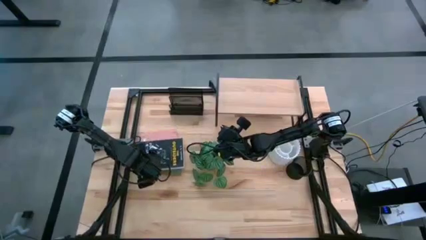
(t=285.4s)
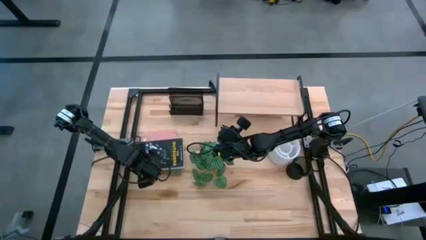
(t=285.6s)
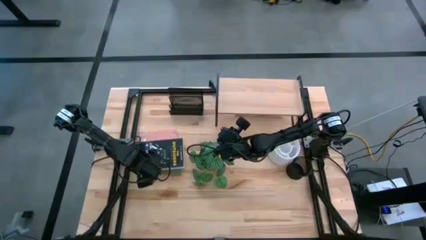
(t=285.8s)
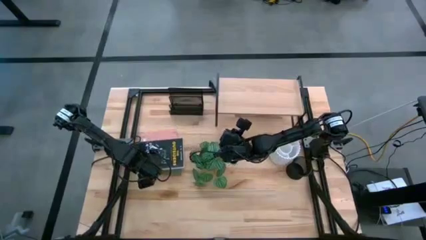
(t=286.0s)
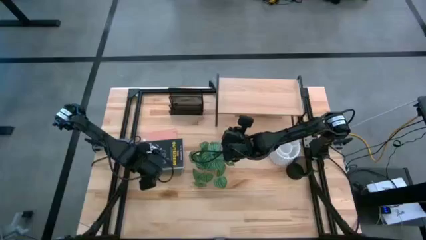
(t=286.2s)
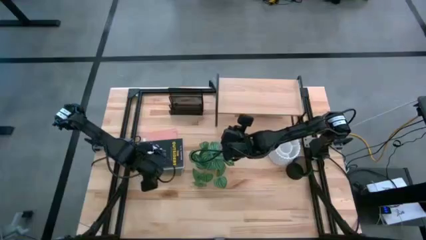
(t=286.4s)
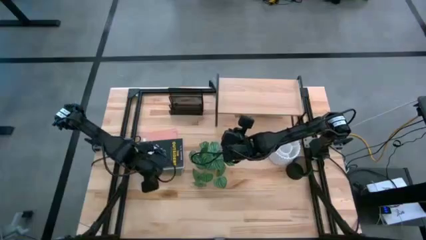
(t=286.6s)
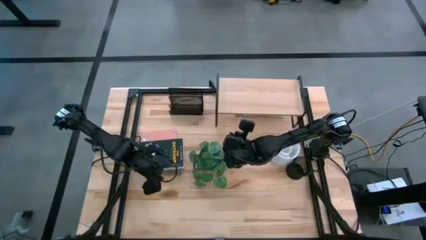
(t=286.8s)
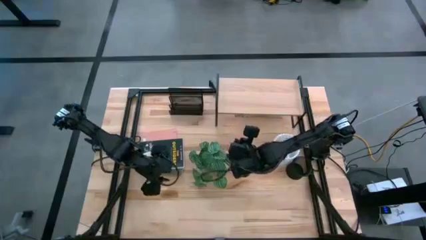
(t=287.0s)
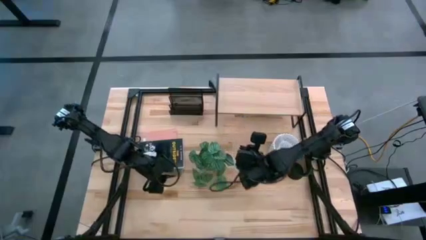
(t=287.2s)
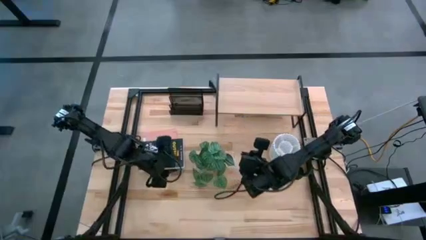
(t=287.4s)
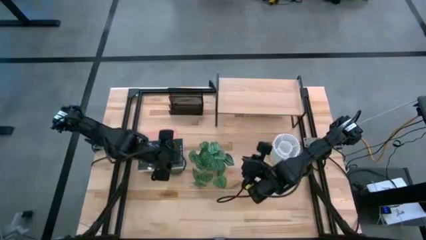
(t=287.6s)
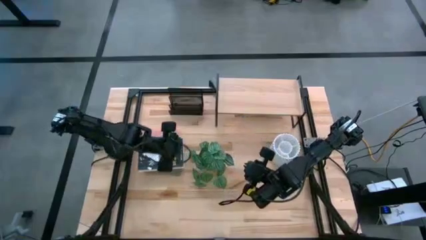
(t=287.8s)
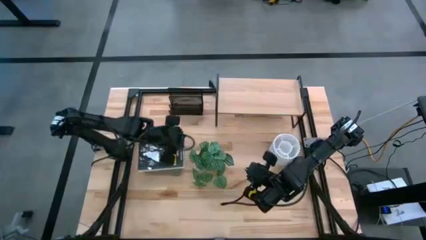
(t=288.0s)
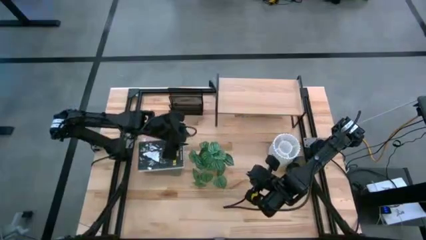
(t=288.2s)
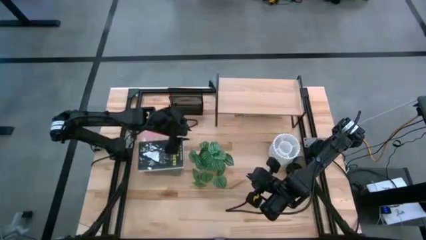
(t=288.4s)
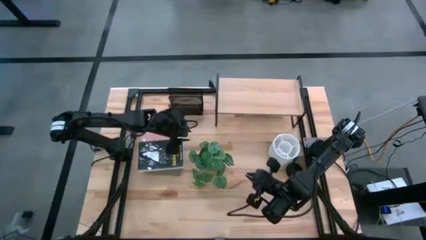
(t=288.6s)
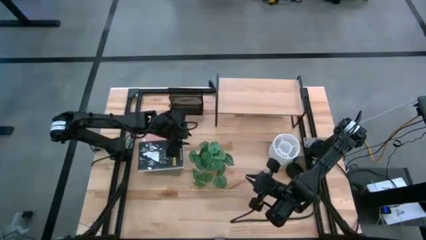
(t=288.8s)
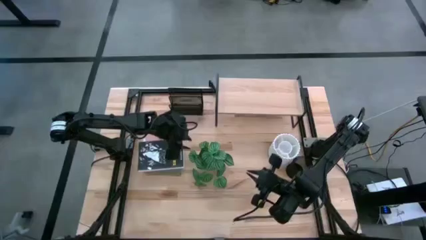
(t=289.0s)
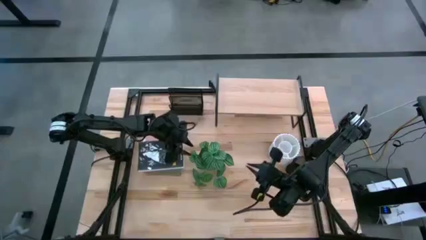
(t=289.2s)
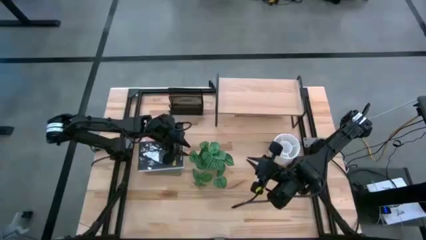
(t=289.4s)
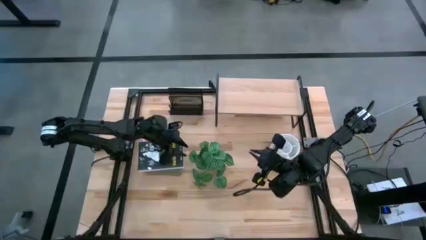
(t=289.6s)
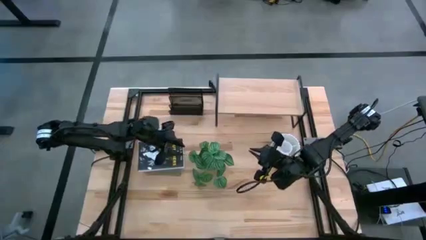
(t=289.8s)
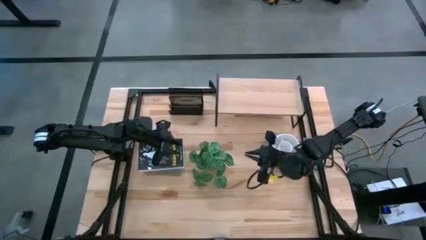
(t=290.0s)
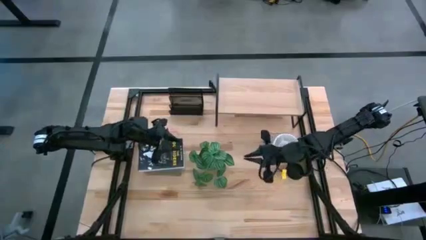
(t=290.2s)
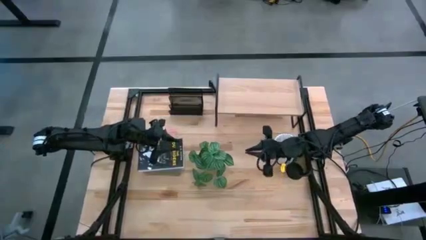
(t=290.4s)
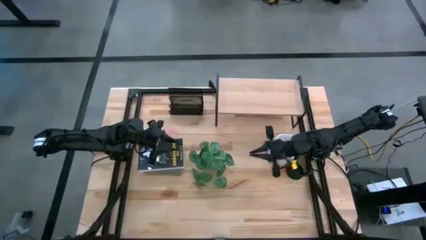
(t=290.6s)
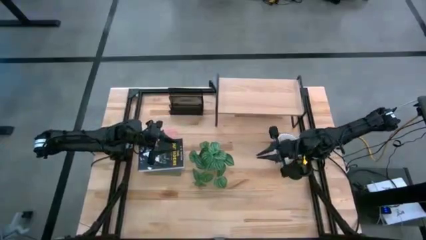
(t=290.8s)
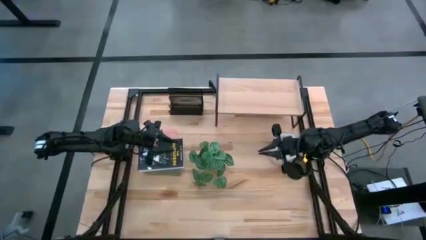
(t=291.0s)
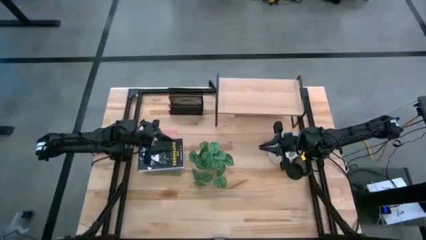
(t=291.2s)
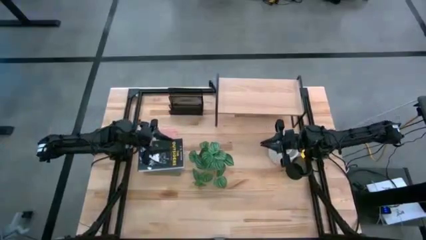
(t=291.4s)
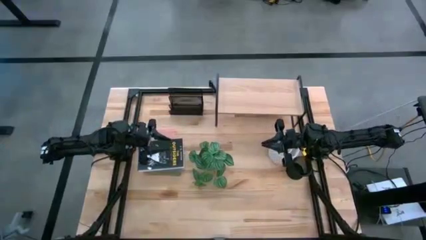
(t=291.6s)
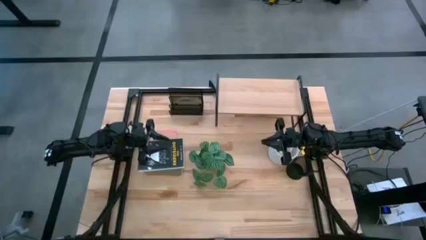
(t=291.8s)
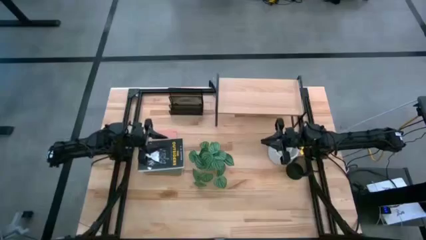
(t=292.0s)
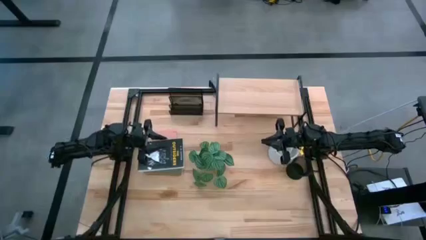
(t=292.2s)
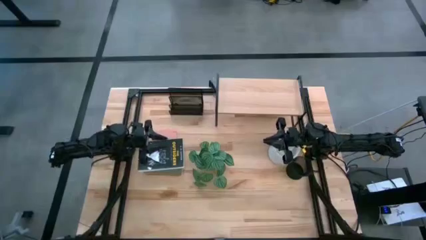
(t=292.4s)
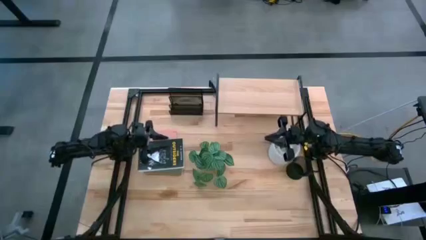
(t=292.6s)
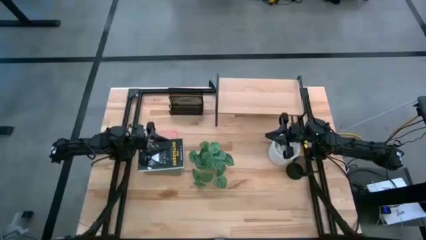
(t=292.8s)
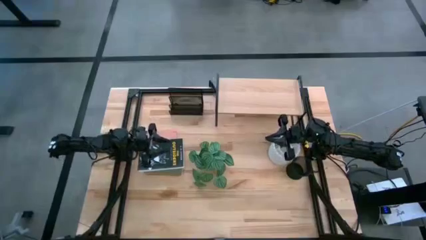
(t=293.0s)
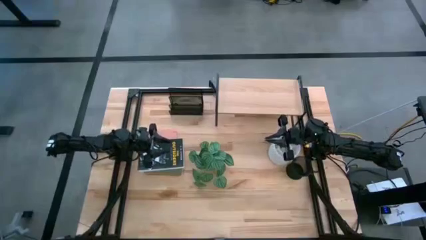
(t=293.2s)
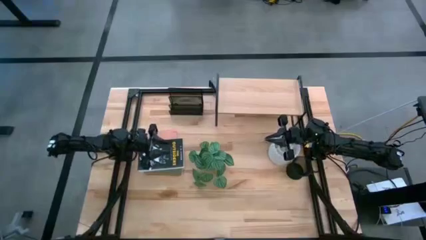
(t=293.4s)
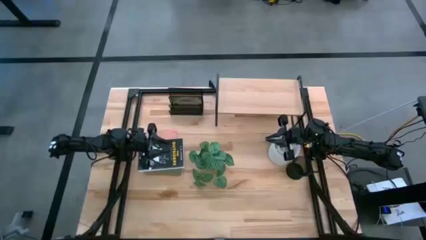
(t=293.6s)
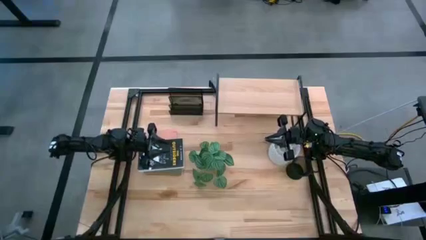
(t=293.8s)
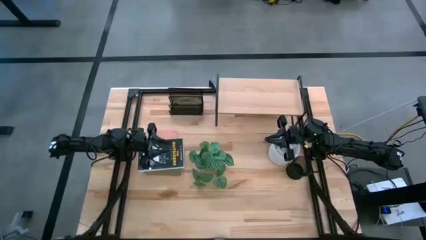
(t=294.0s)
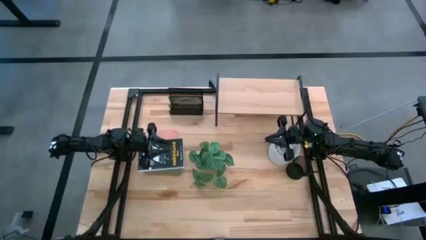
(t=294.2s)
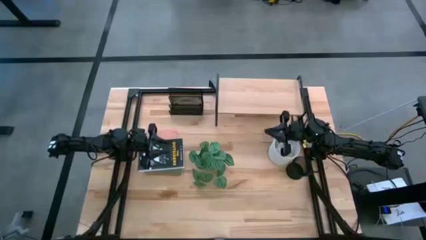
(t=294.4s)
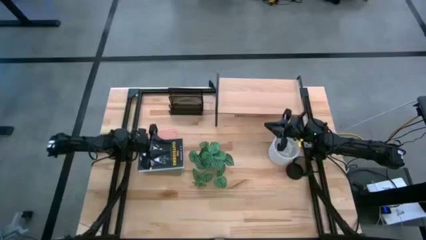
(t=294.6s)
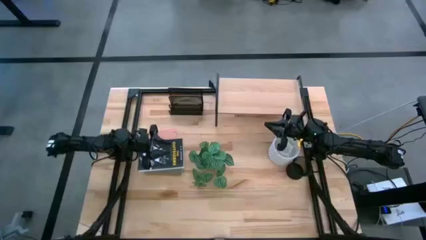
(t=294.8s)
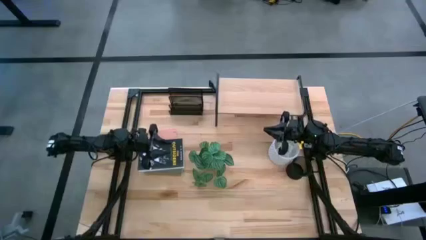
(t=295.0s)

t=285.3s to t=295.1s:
Task: Stock shelves
Return to Home Position

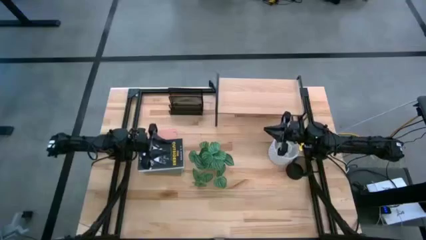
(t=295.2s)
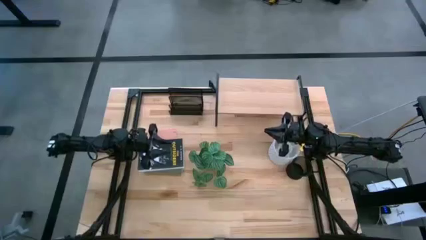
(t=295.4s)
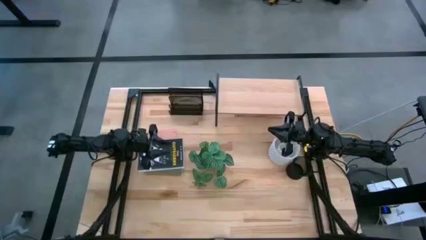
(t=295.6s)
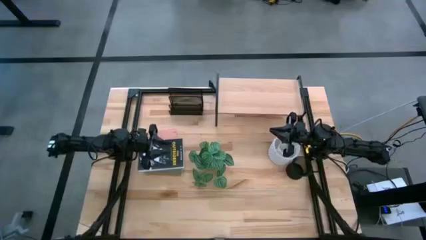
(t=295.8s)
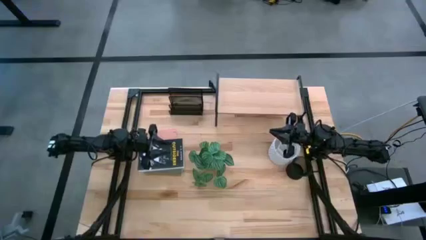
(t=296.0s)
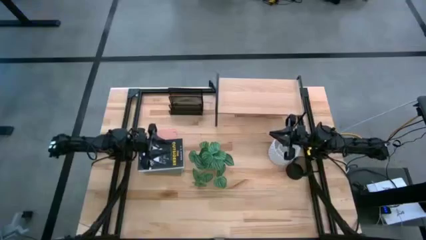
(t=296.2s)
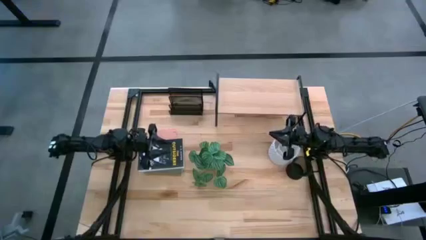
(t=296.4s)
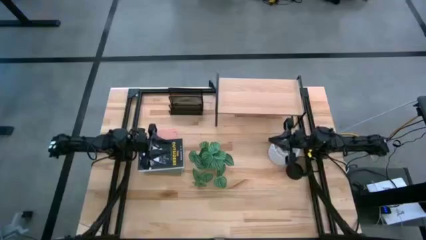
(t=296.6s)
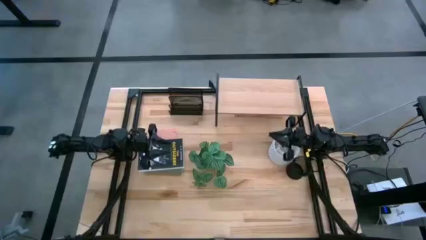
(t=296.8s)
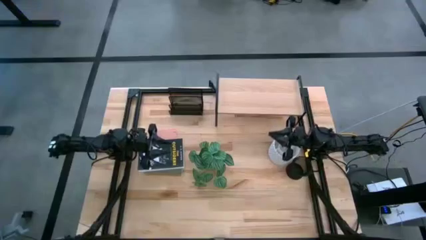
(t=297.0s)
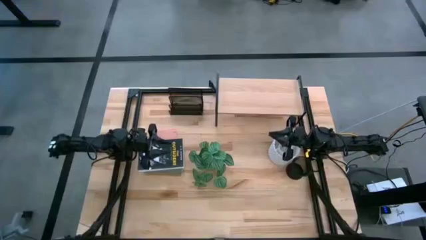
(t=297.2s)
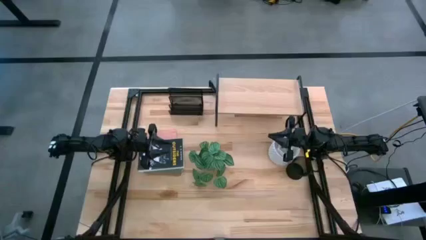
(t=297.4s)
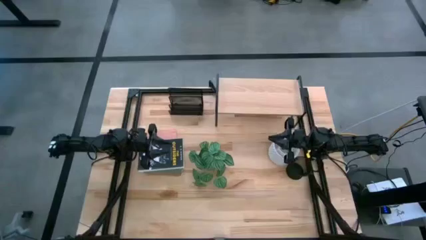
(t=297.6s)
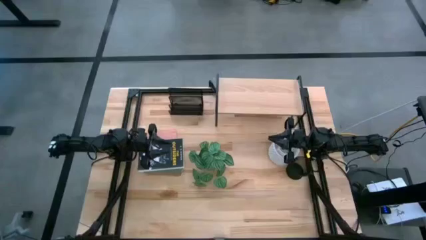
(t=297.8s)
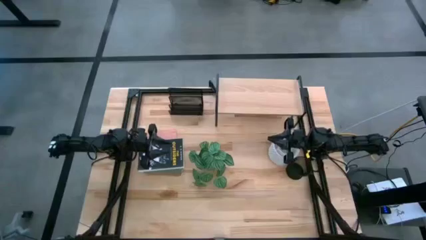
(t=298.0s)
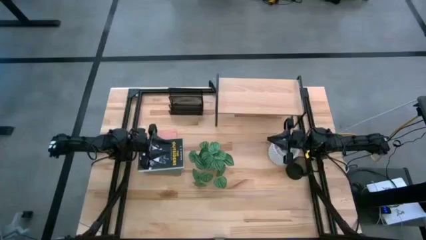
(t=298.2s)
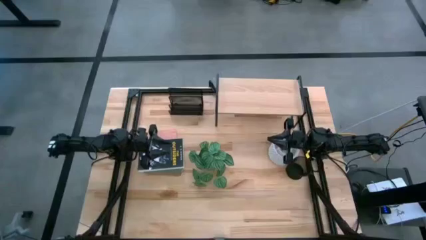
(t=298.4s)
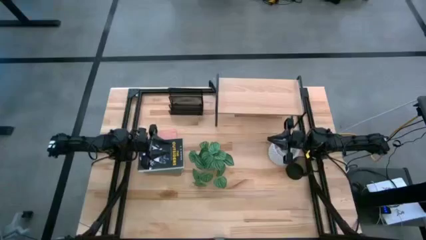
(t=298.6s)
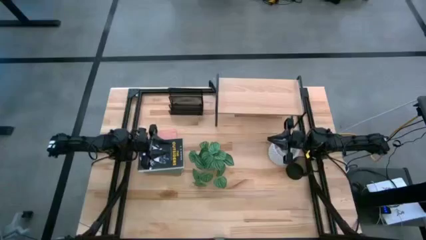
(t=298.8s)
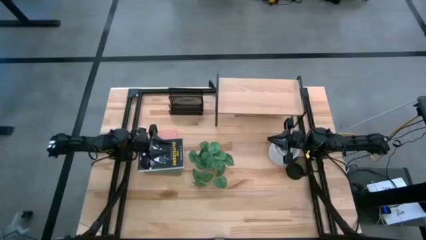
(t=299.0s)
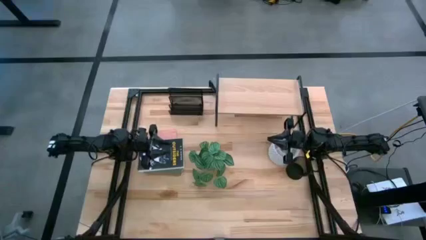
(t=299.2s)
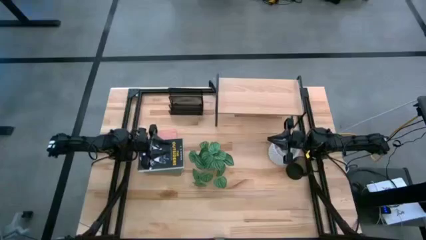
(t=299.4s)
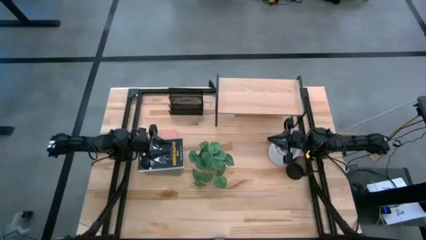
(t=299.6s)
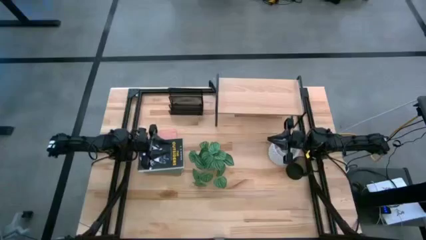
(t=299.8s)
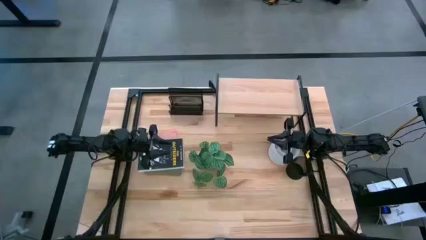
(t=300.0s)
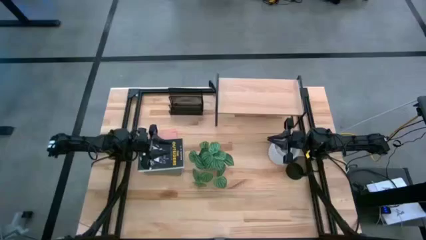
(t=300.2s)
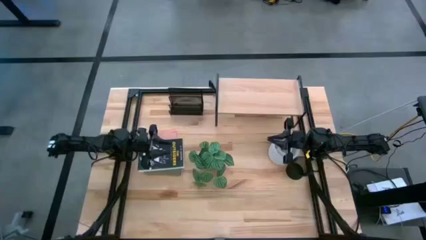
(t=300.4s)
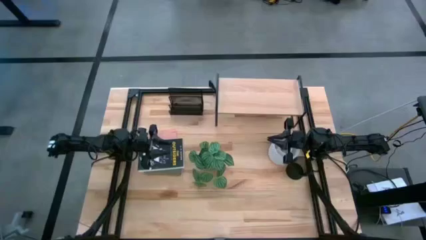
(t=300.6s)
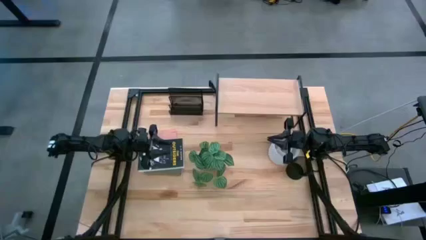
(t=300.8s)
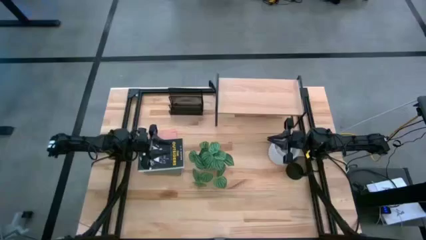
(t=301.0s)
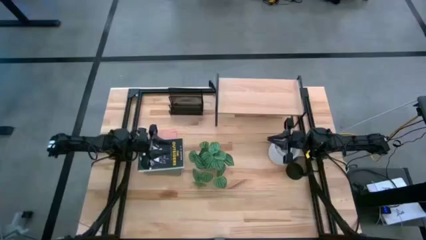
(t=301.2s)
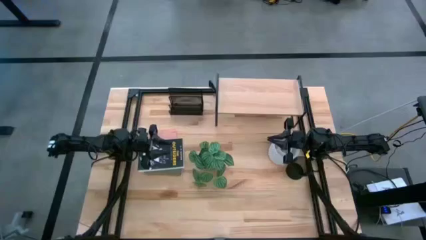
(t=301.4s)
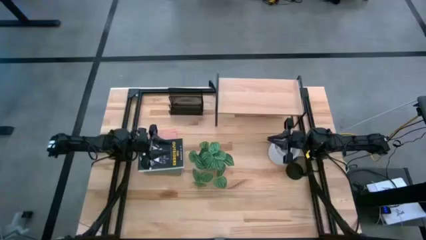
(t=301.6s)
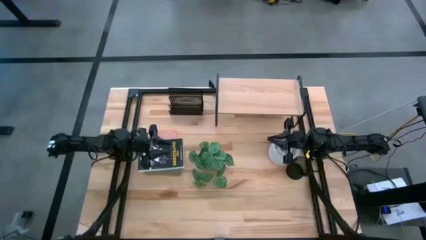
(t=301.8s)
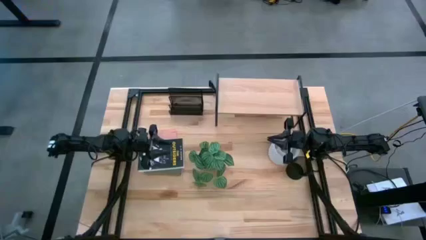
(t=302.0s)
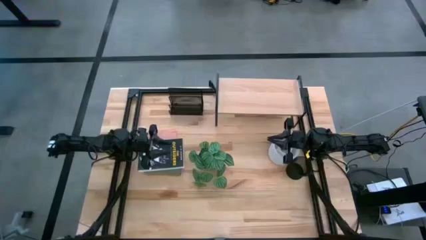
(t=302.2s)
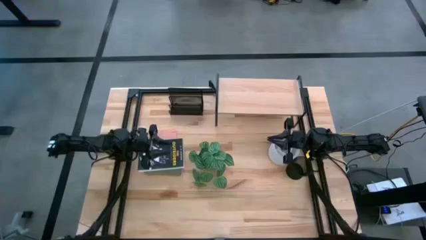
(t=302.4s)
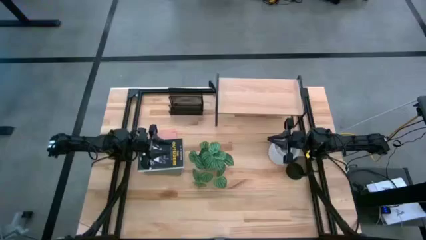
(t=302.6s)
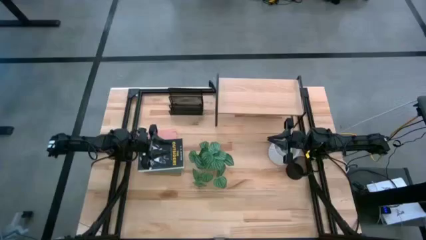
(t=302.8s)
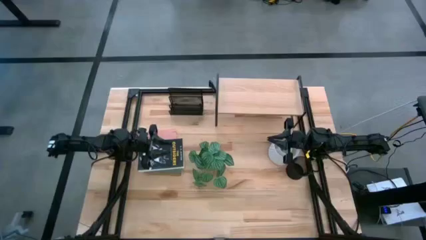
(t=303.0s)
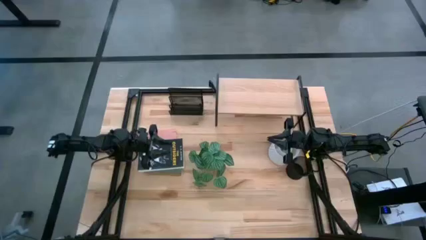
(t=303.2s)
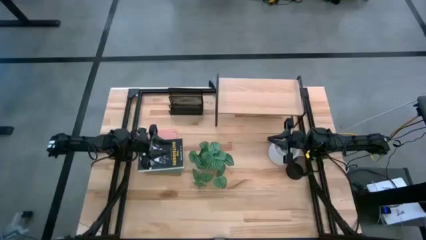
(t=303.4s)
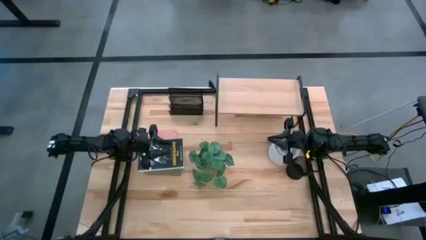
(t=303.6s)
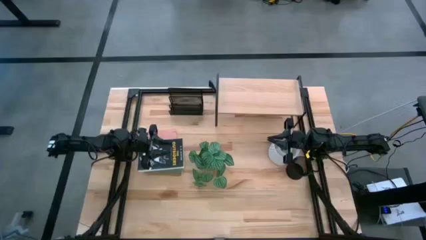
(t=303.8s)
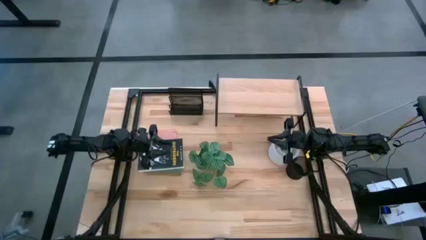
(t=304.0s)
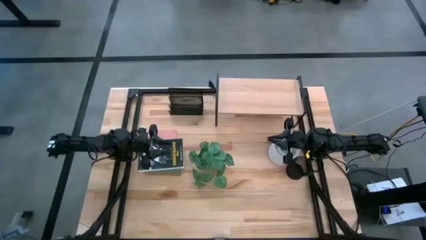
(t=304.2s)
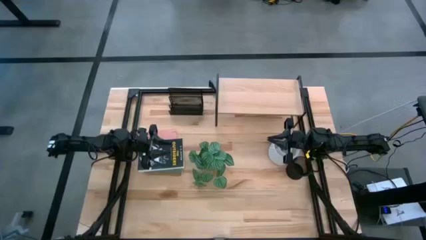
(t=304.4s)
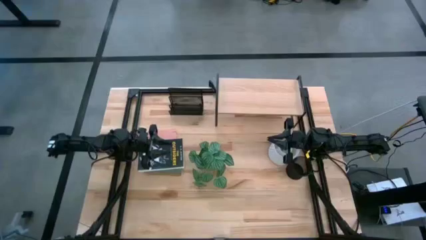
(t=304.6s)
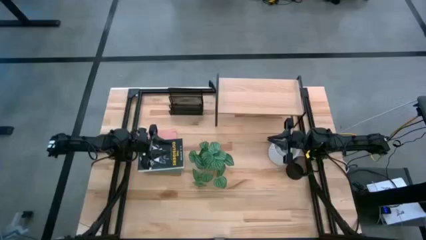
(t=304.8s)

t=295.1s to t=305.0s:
Return to Home Position
